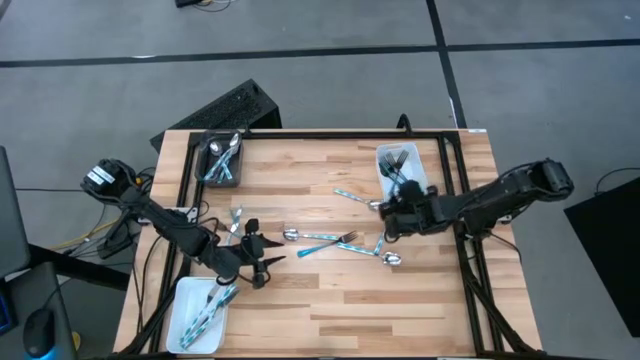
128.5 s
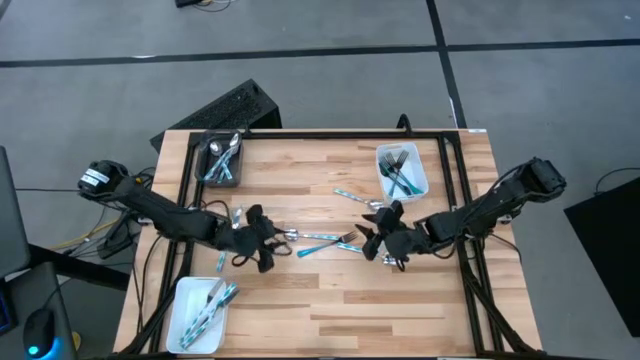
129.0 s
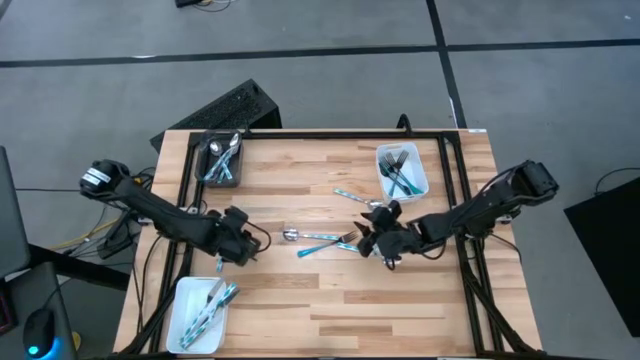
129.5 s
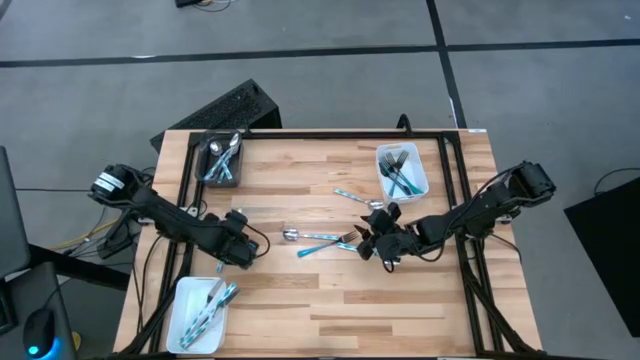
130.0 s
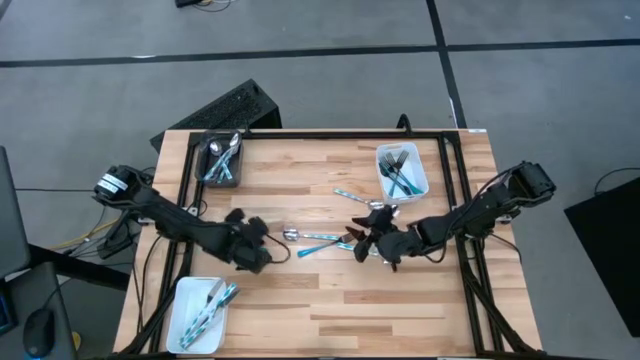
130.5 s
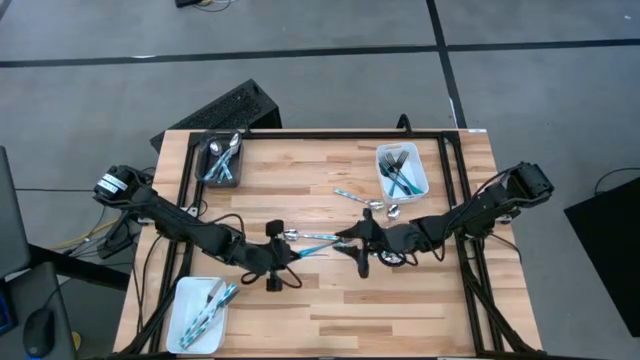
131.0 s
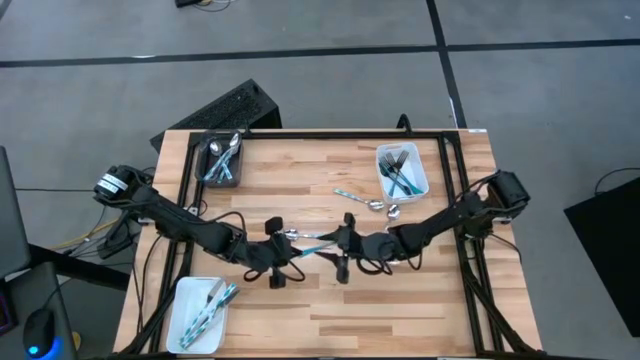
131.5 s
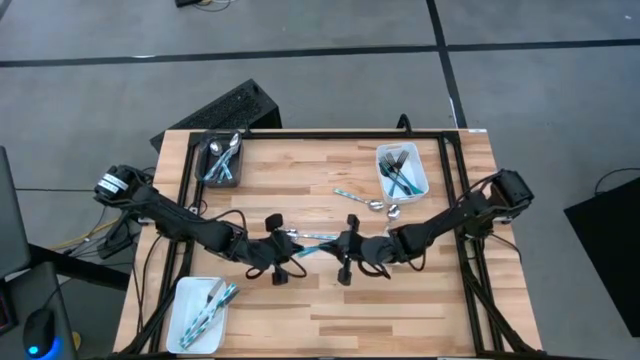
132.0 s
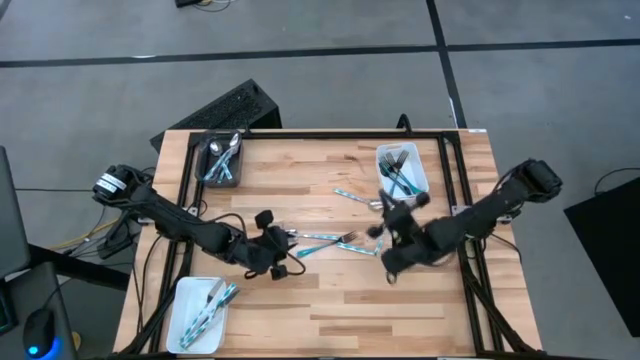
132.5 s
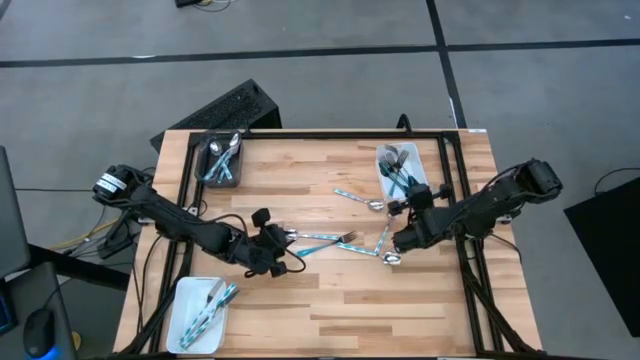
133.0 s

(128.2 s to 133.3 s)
Task: Sort silverware by color (type)
Put the blue fork into the top white bin

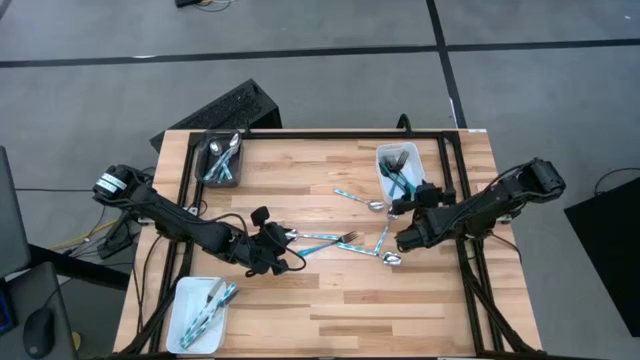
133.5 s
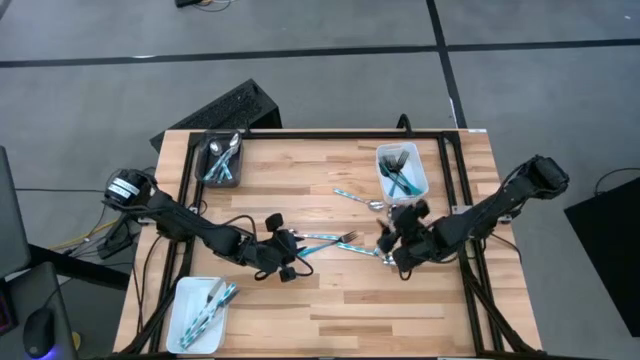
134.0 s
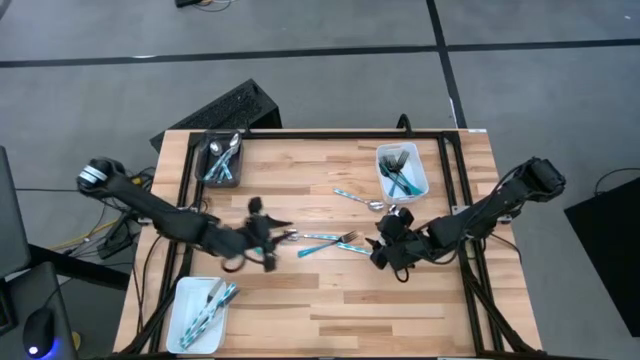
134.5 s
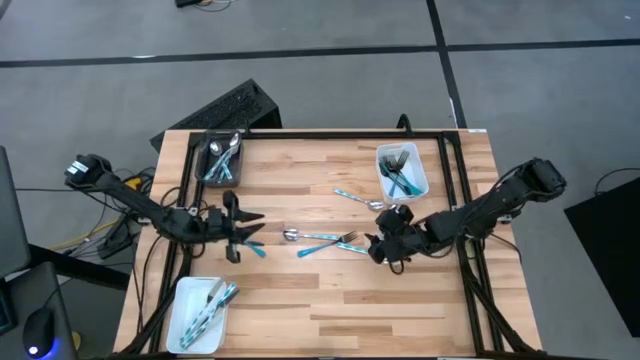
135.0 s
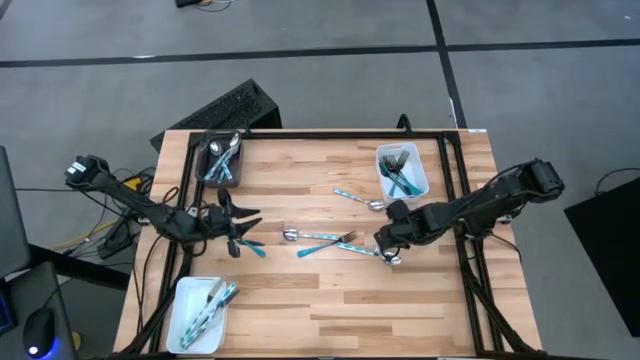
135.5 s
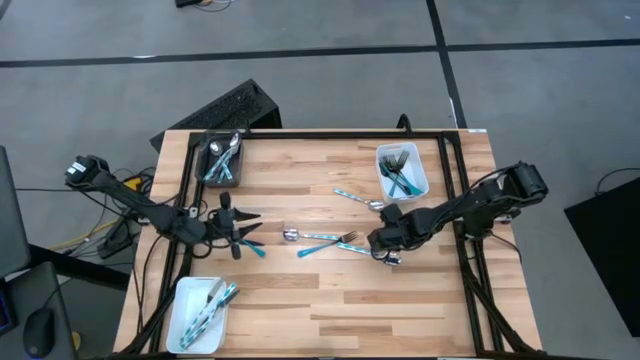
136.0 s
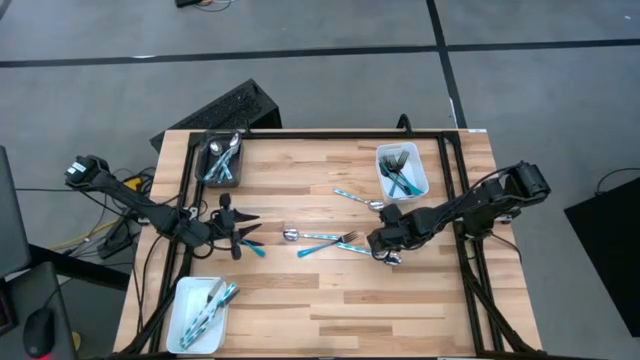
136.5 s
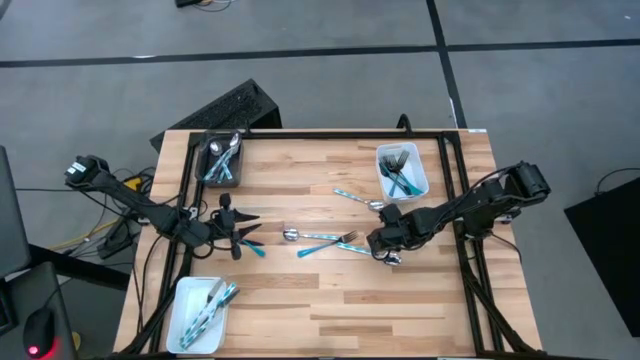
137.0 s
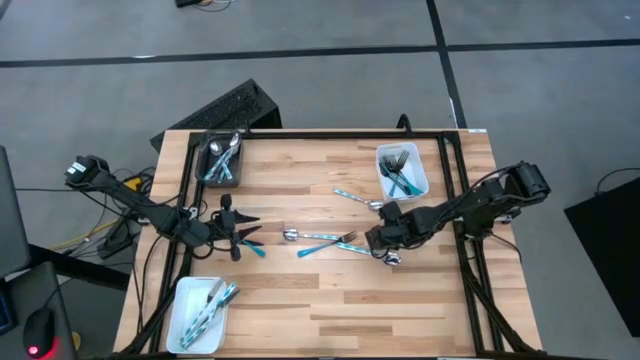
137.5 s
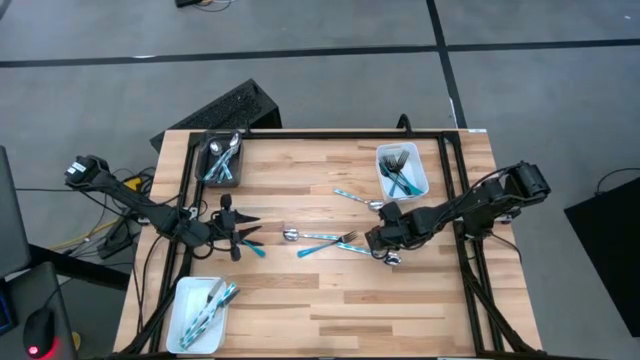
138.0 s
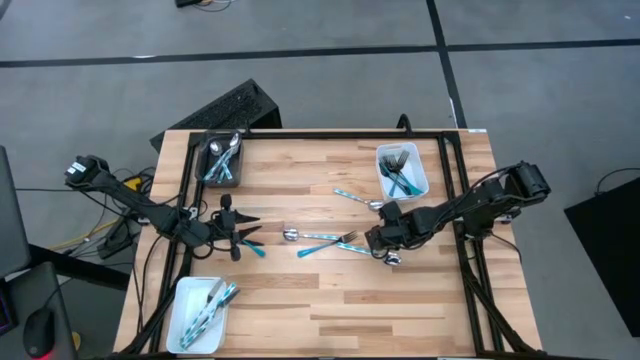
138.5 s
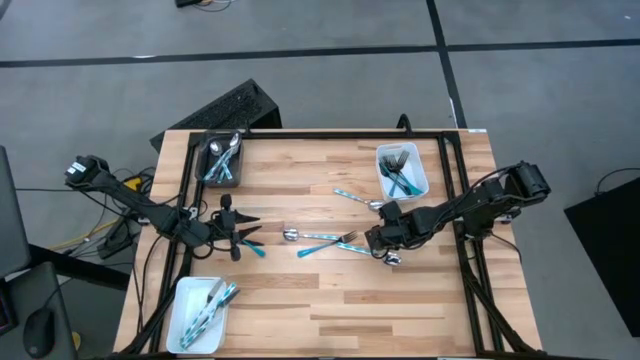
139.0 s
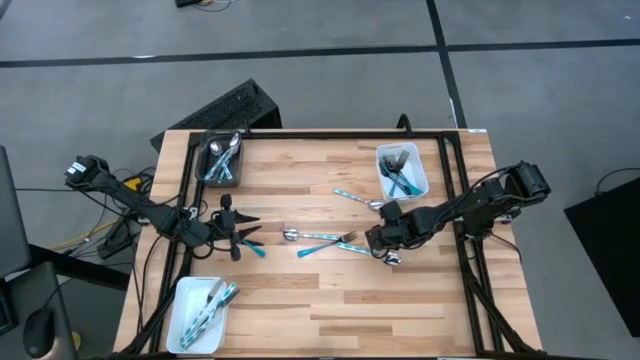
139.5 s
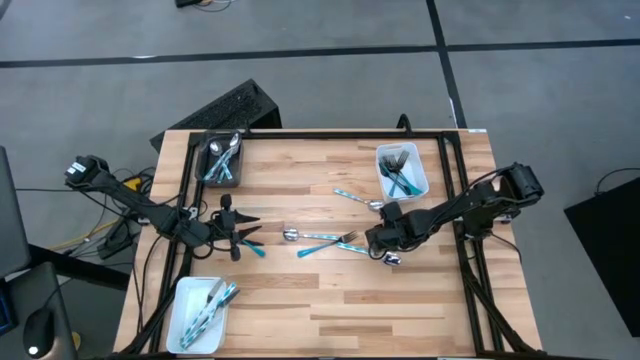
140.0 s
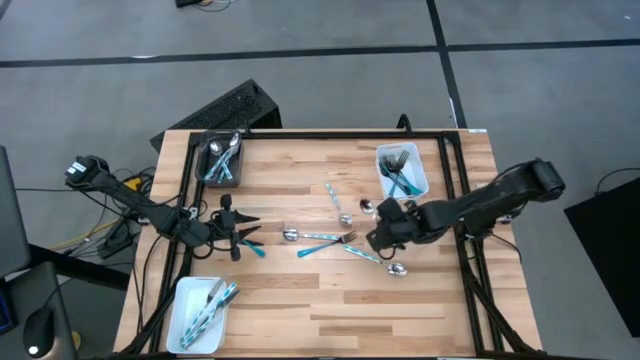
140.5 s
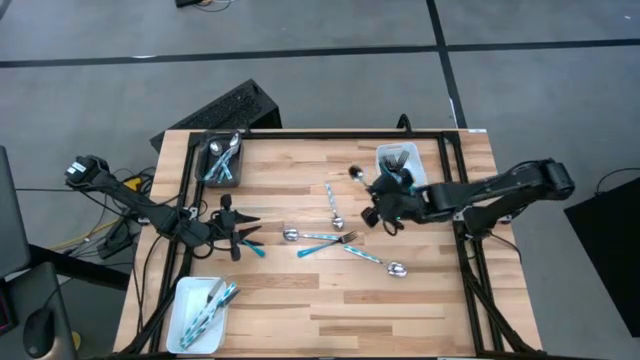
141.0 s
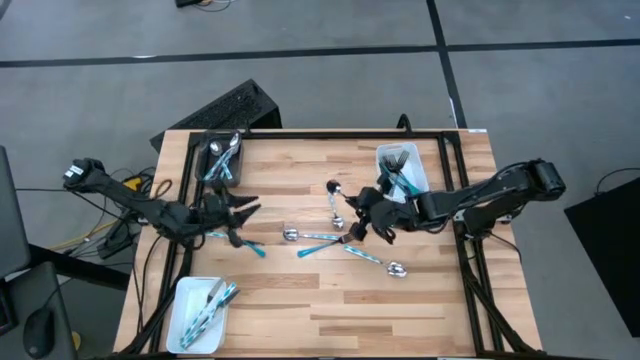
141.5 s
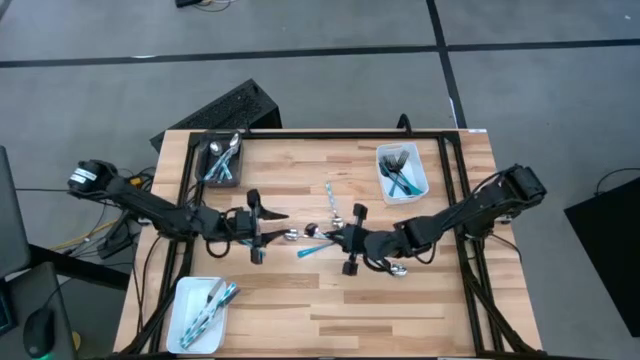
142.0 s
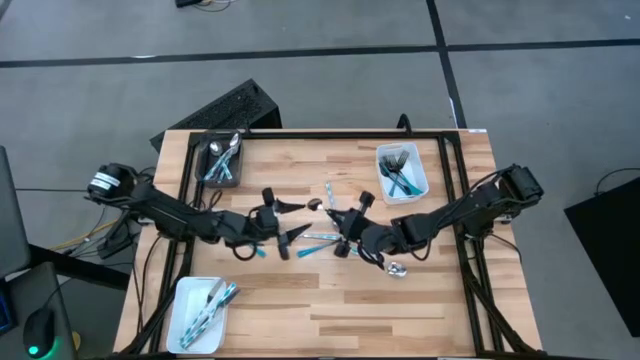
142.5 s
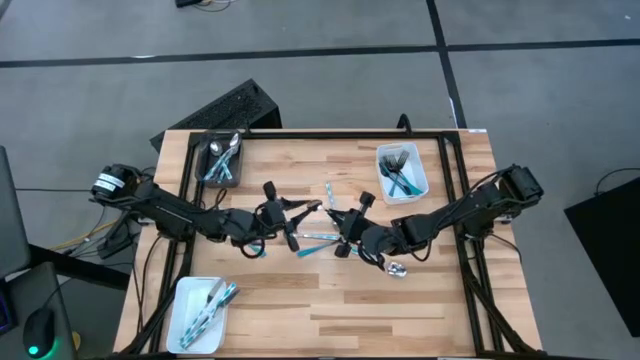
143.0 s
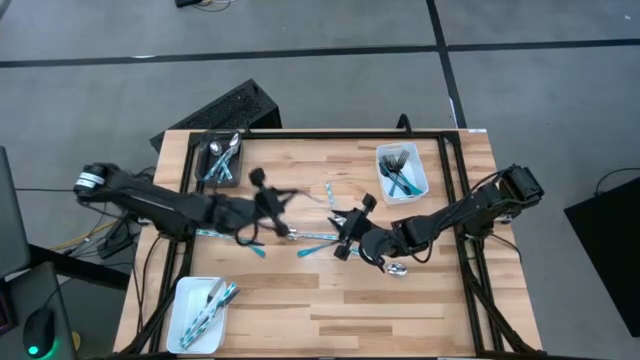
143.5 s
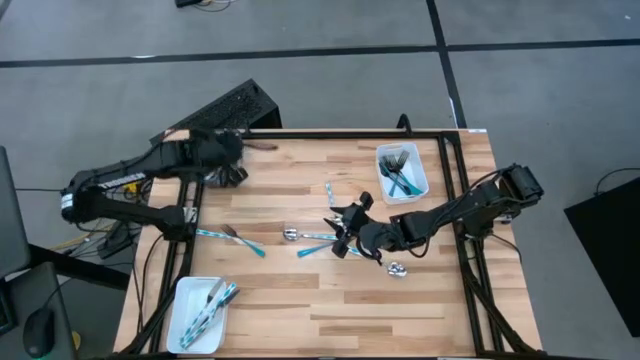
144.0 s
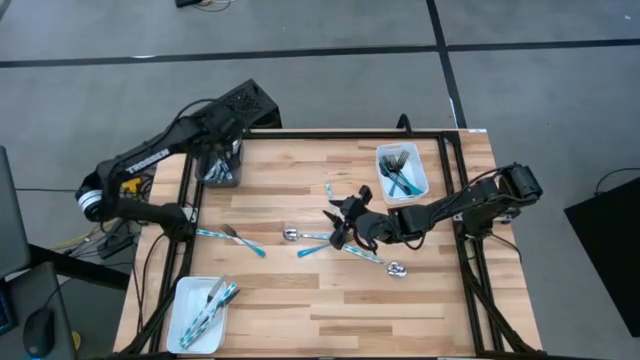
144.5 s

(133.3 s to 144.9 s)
Put the light blue spoon into the black bin

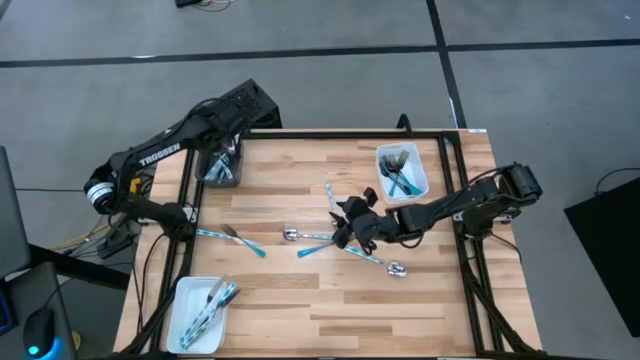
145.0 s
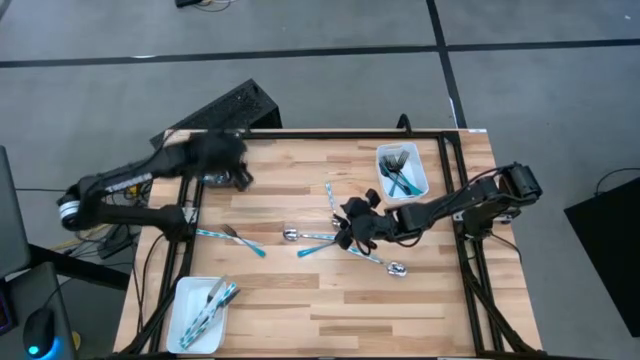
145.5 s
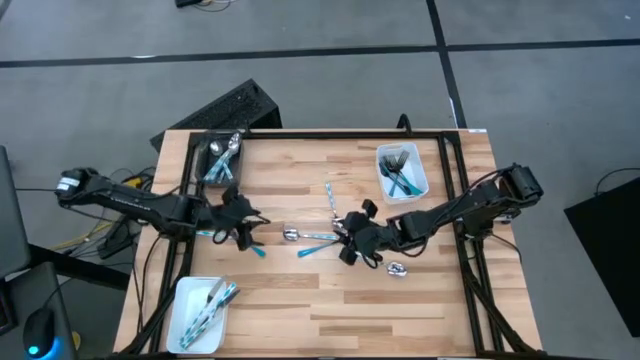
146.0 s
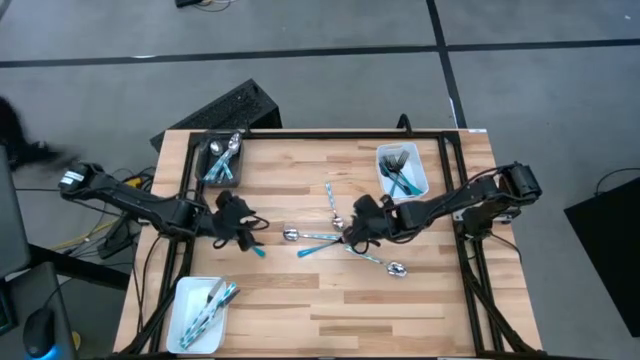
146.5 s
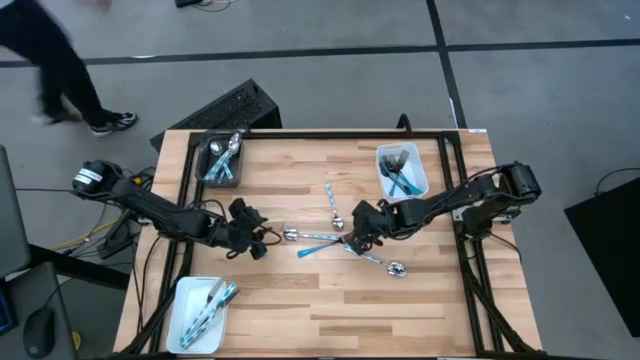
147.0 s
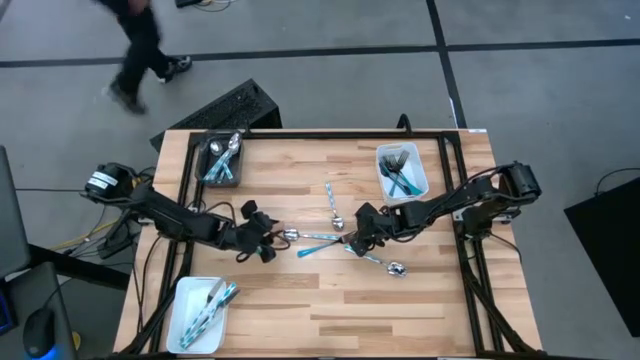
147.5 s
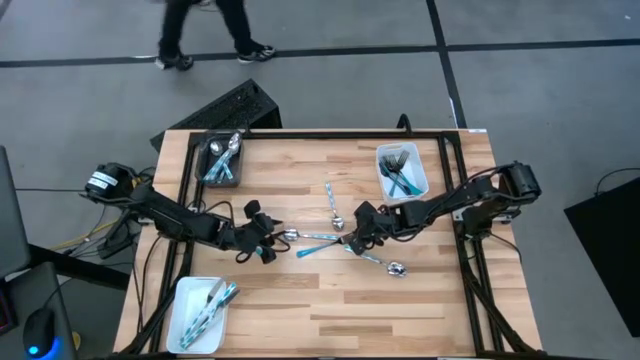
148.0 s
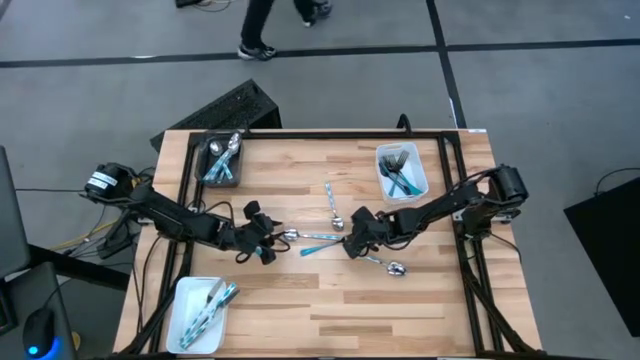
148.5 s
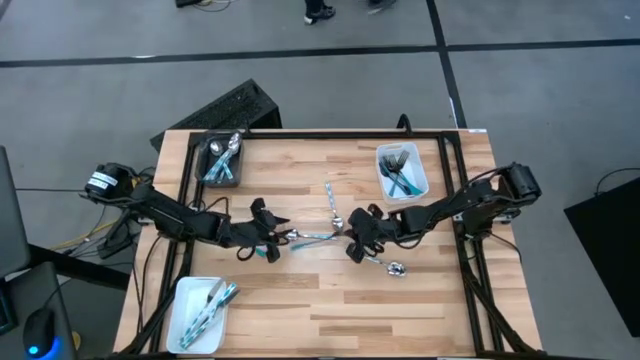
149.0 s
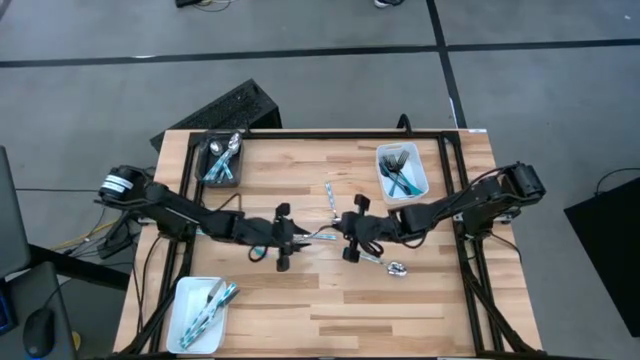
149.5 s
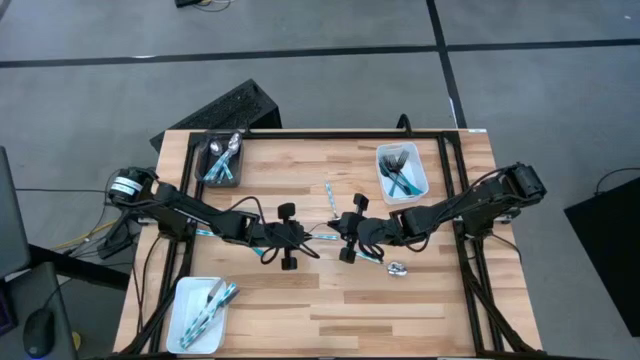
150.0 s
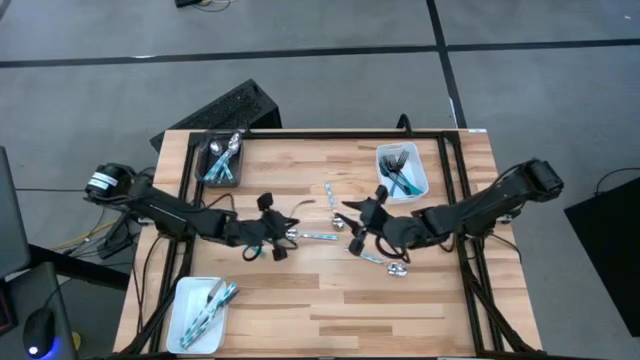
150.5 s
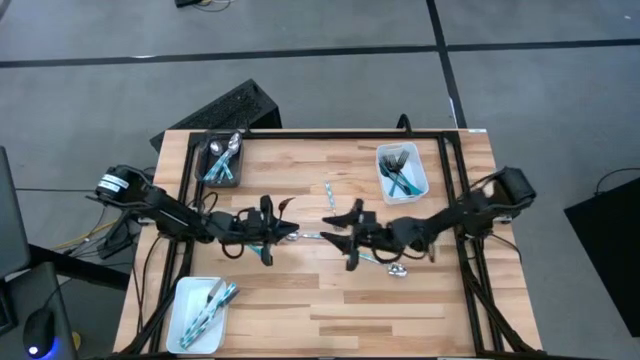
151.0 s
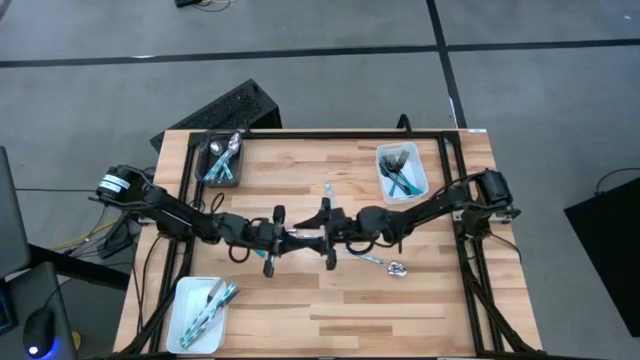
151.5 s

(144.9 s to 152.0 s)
Put the blue fork into the top white bin
